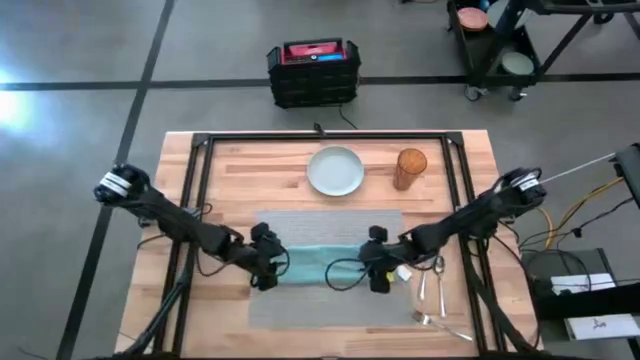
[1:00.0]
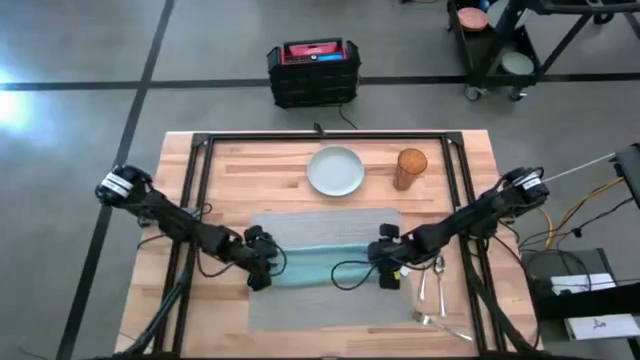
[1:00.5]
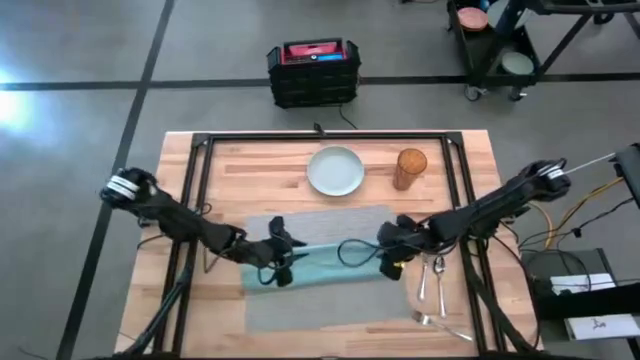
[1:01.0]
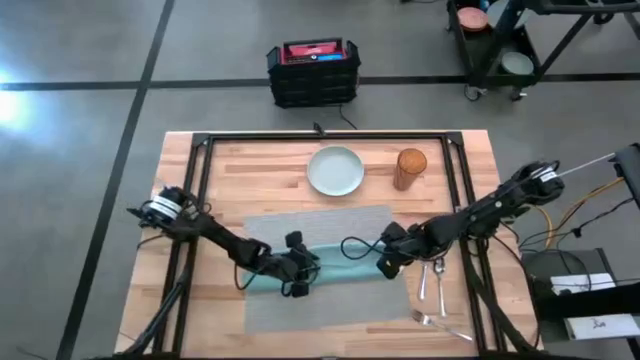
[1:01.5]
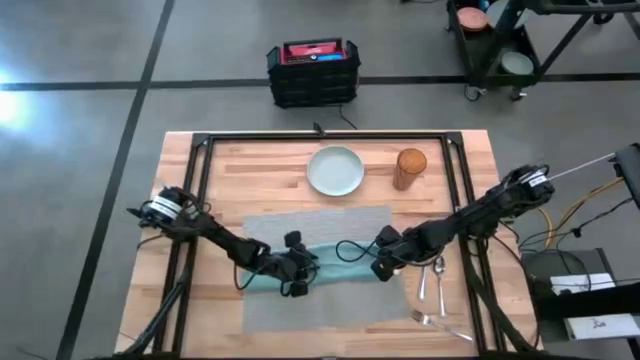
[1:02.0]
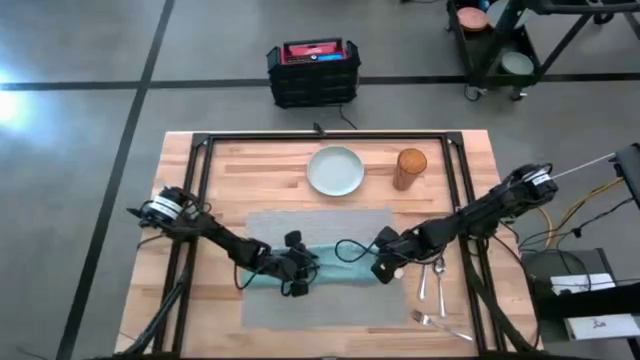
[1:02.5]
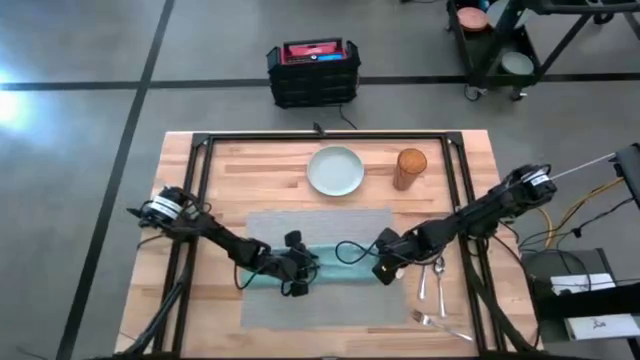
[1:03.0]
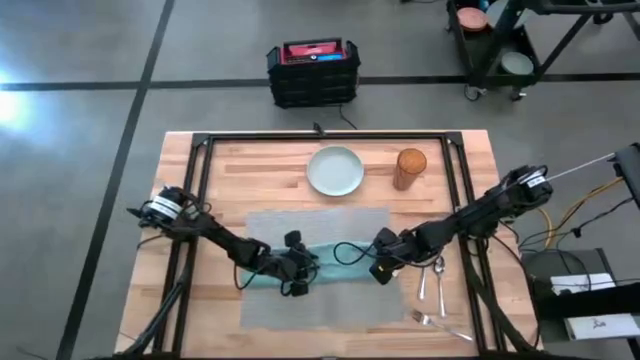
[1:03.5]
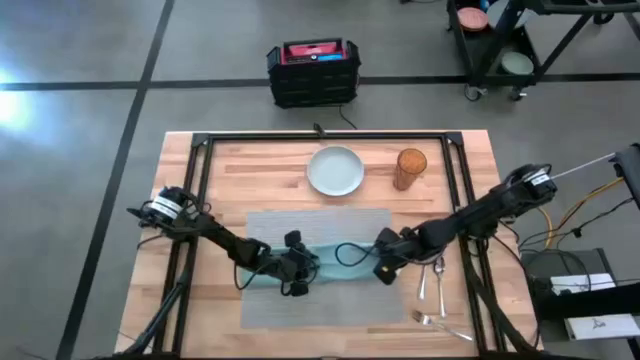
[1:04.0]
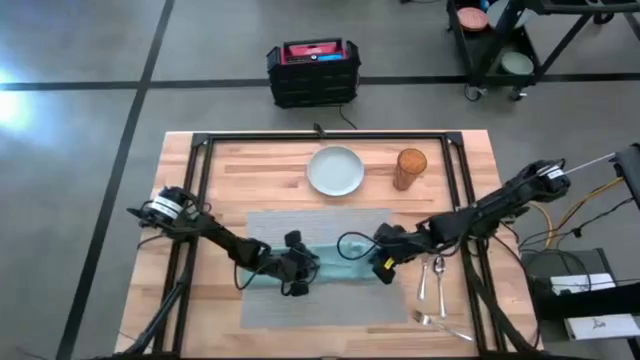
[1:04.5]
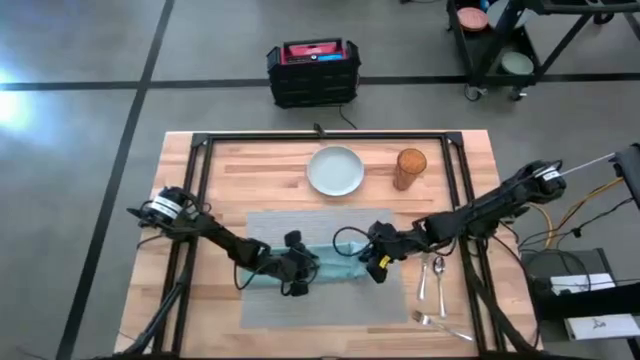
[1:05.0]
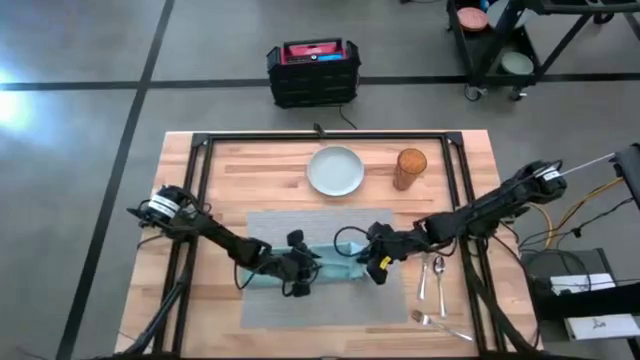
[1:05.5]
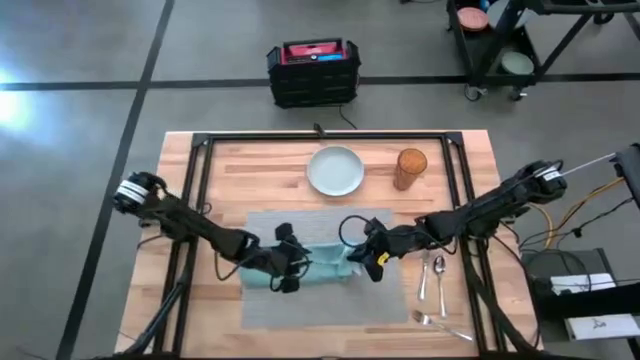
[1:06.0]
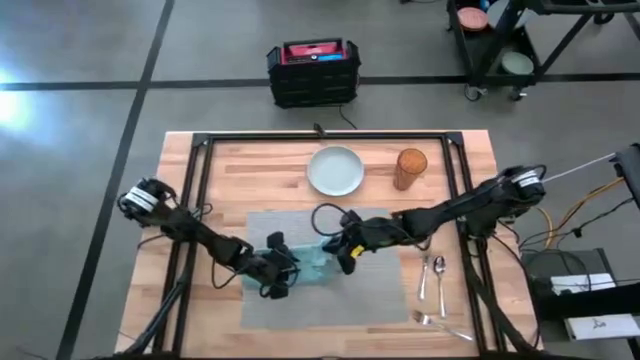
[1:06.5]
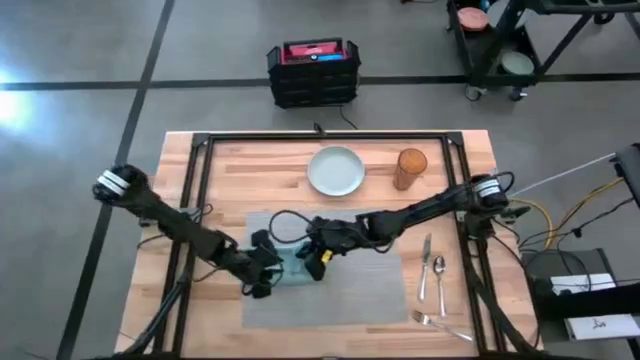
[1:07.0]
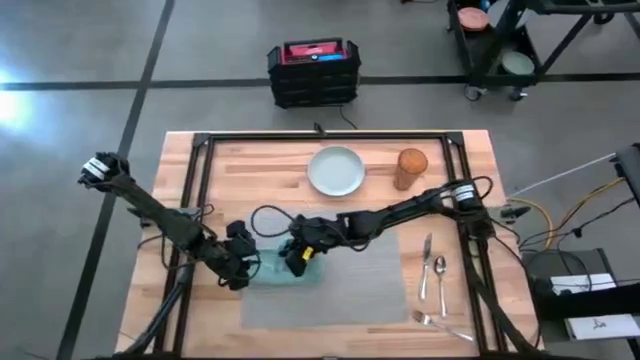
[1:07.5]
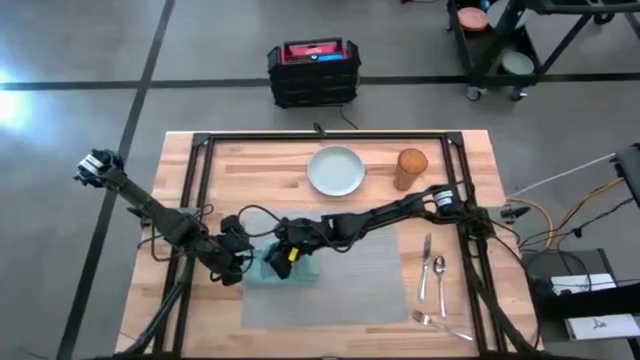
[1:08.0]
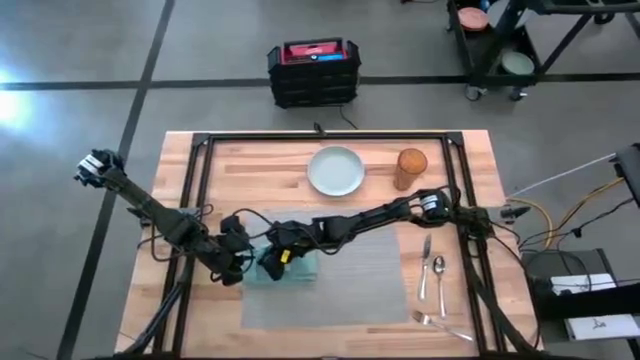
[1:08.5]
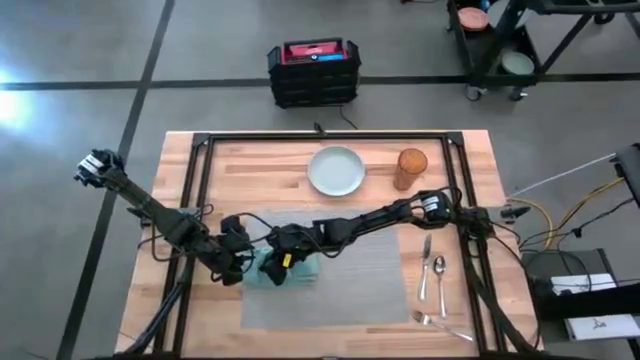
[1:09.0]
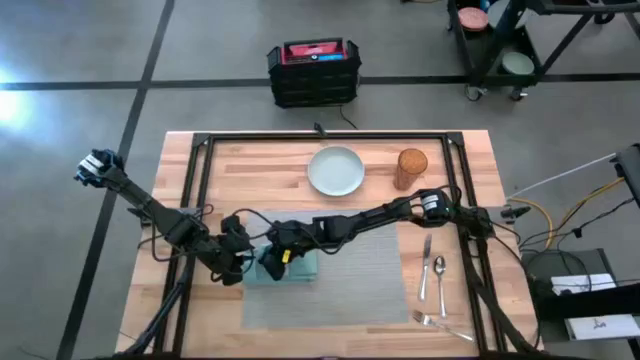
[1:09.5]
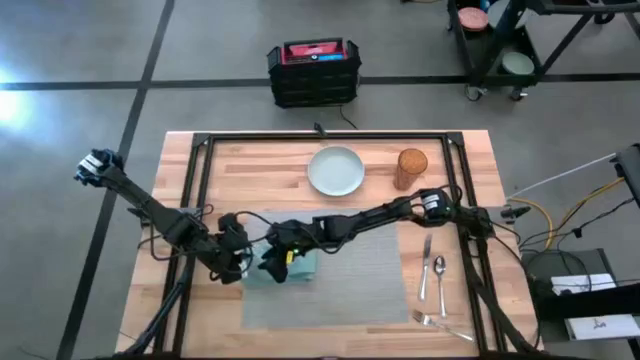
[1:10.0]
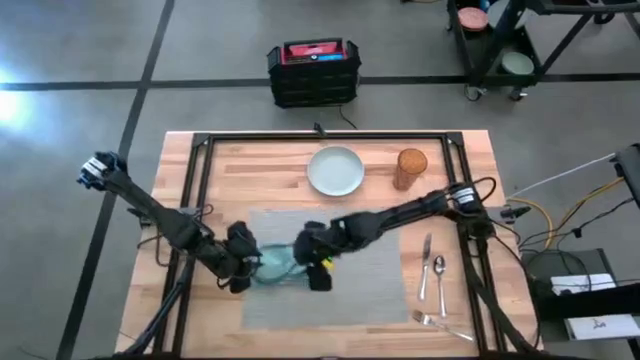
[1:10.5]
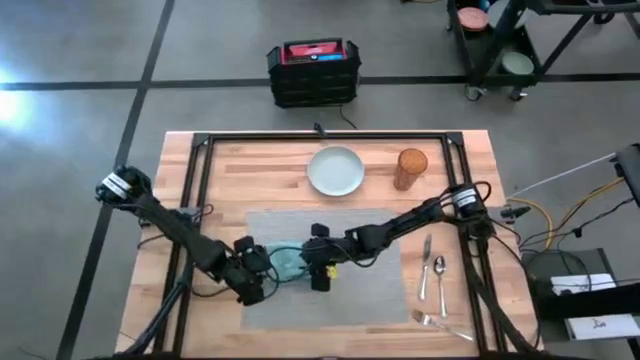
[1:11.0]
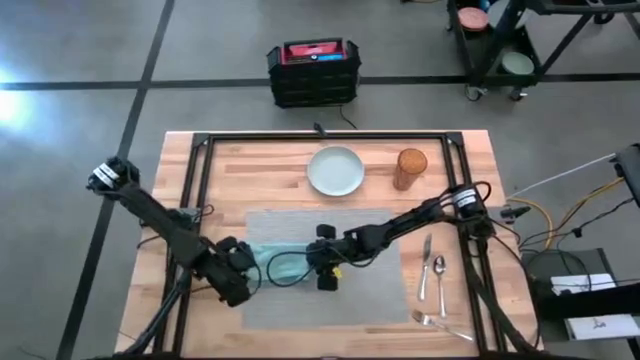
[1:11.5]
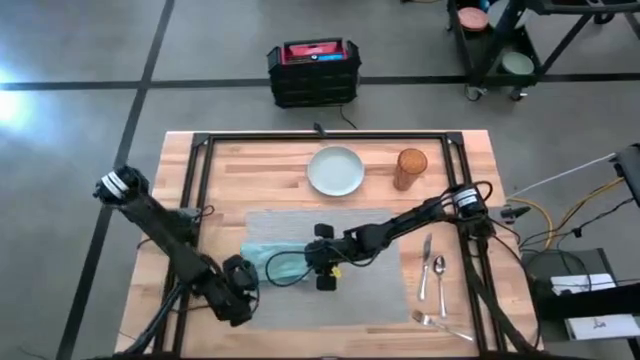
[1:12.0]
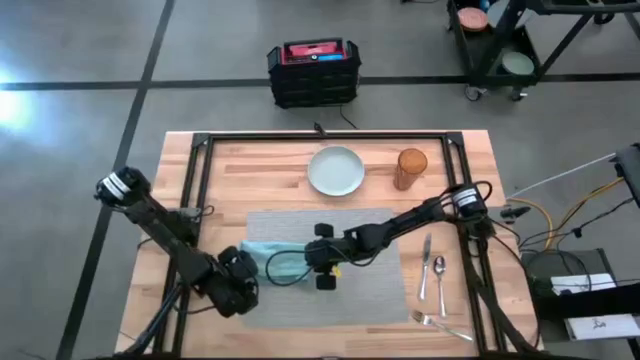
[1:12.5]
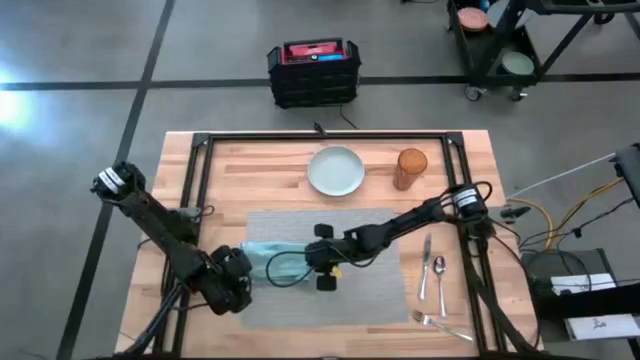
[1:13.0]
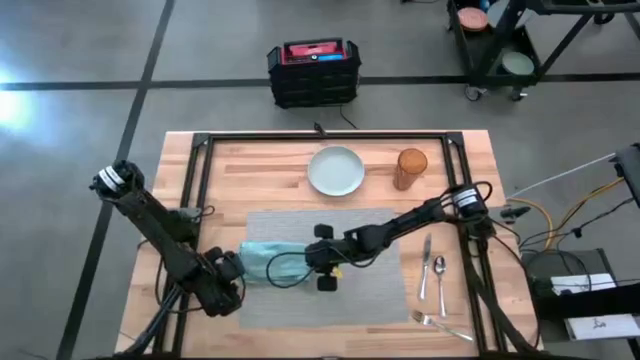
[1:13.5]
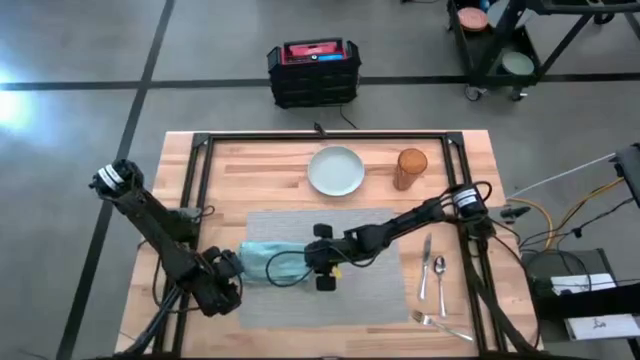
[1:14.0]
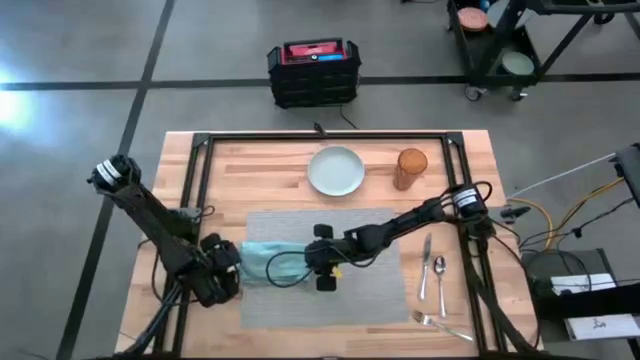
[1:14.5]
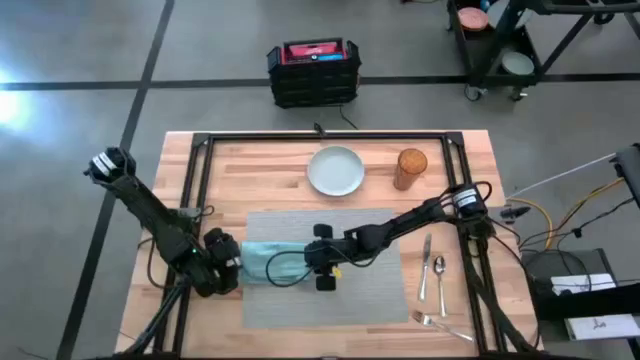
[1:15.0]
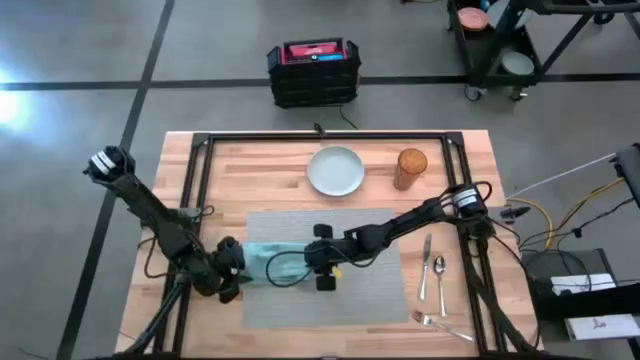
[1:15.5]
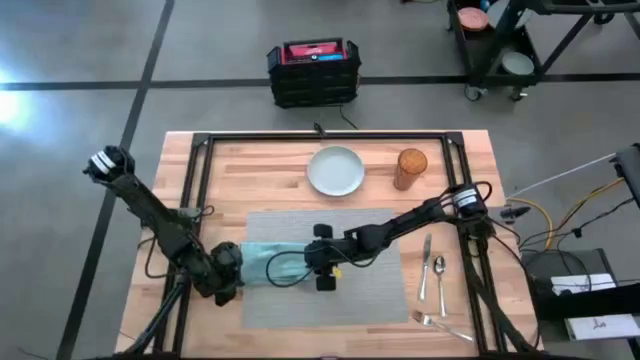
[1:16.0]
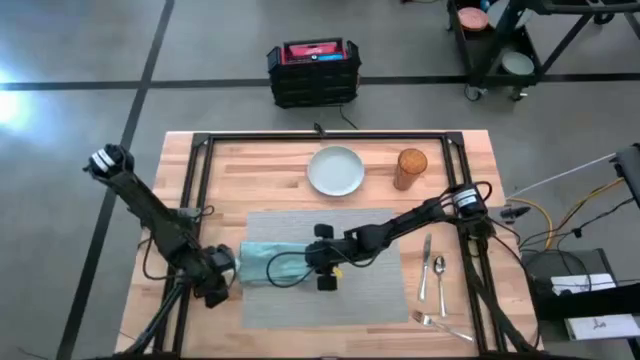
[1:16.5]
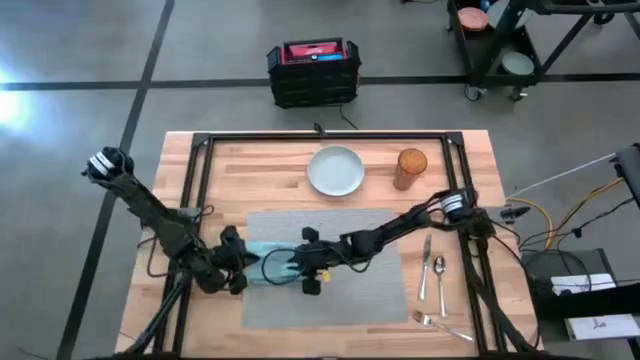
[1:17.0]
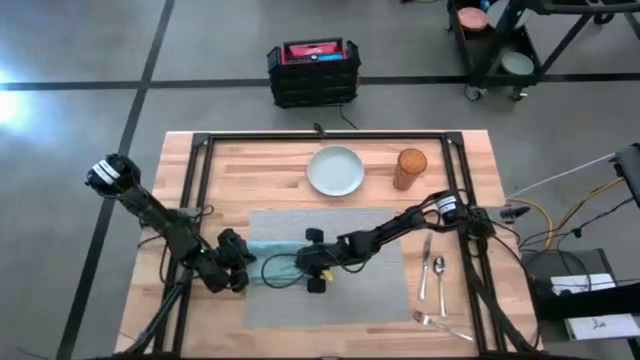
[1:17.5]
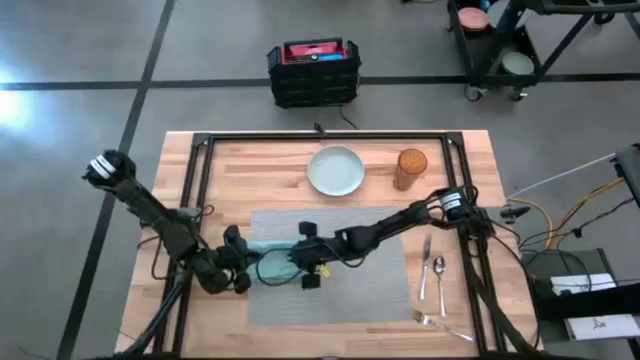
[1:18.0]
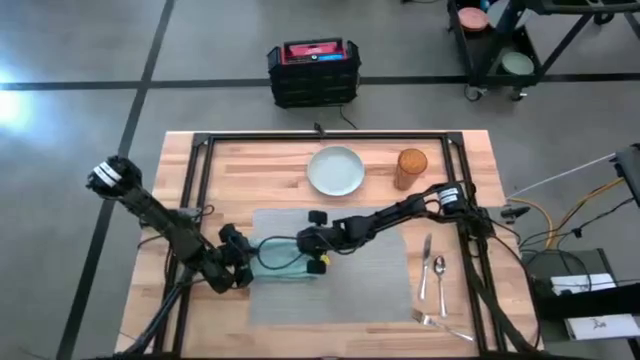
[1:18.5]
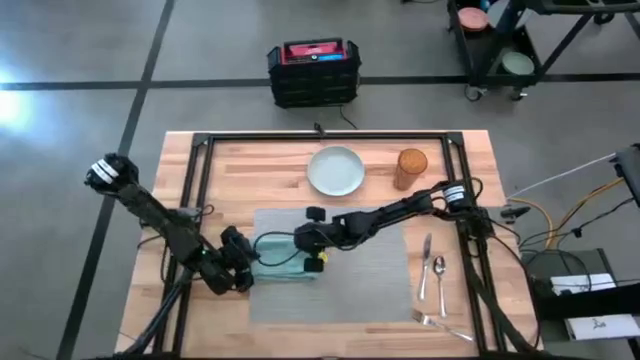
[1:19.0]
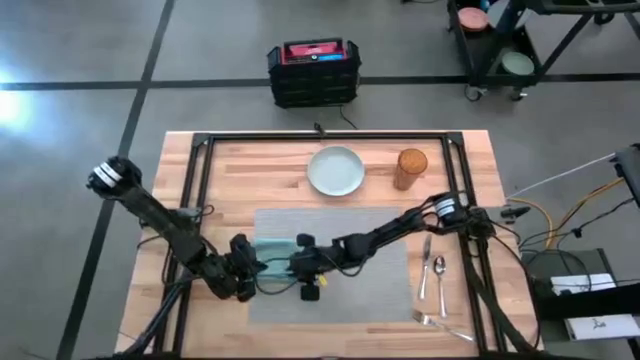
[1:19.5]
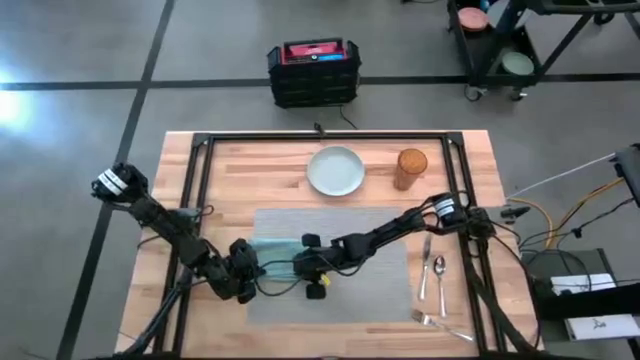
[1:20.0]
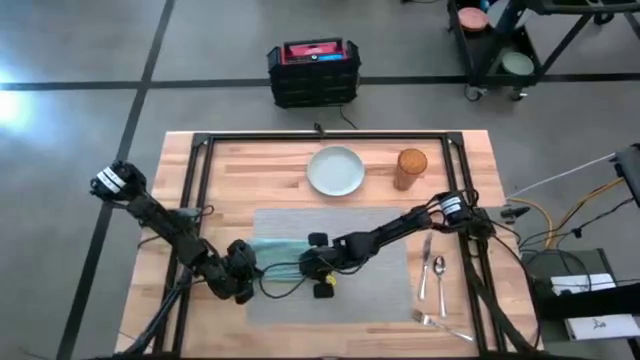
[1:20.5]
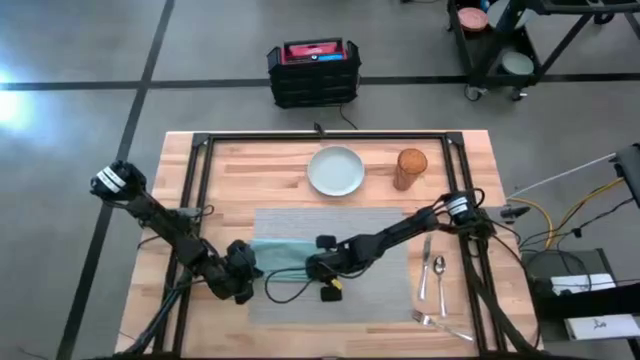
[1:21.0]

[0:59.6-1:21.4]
Task: Set table place
Fold the table napkin
